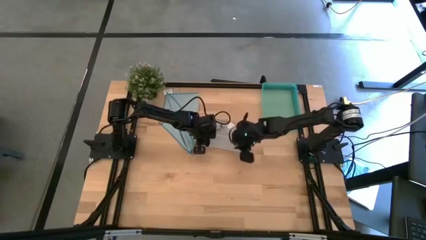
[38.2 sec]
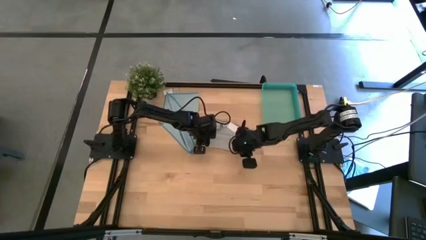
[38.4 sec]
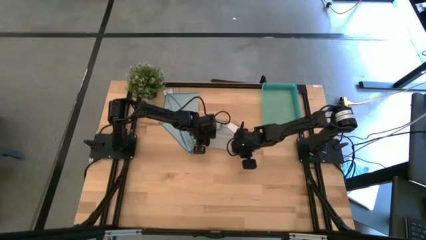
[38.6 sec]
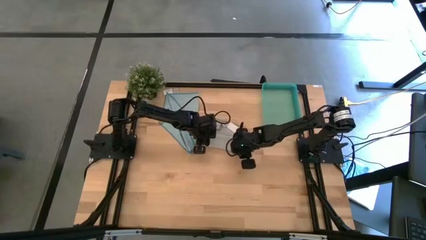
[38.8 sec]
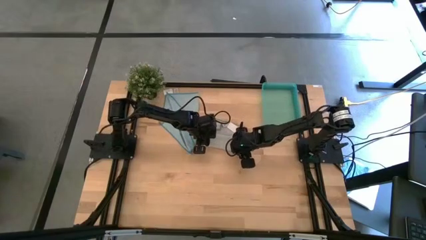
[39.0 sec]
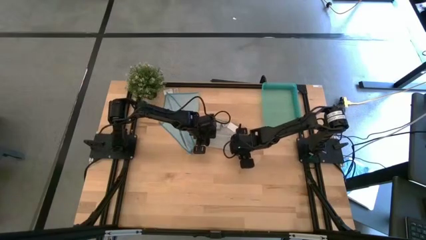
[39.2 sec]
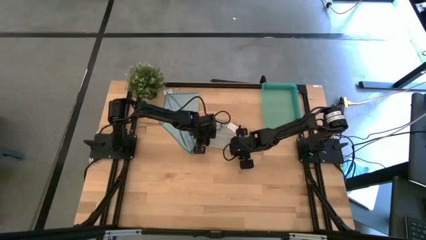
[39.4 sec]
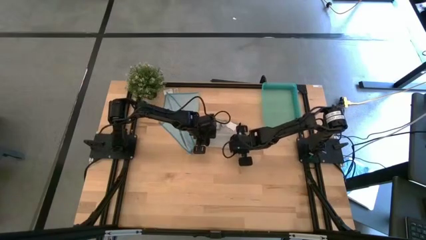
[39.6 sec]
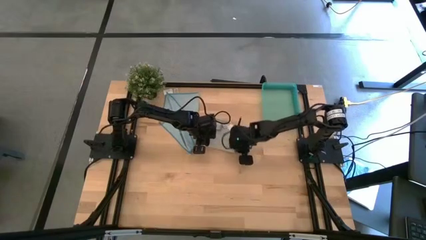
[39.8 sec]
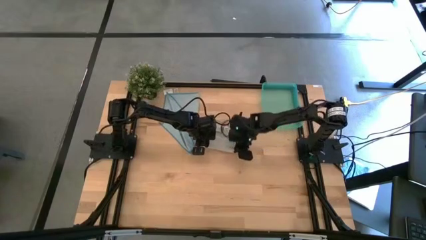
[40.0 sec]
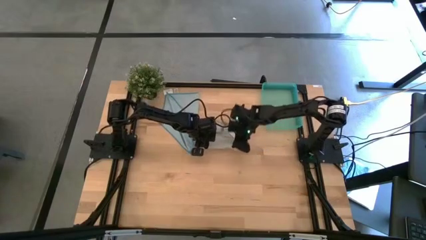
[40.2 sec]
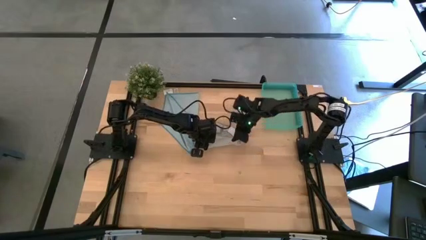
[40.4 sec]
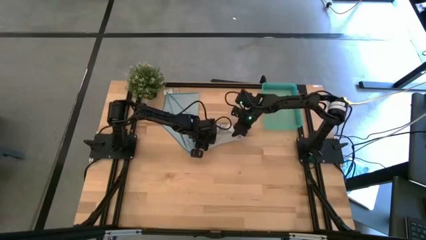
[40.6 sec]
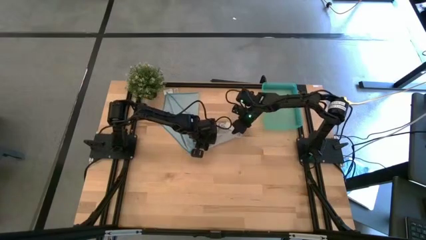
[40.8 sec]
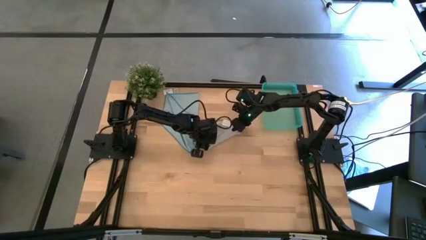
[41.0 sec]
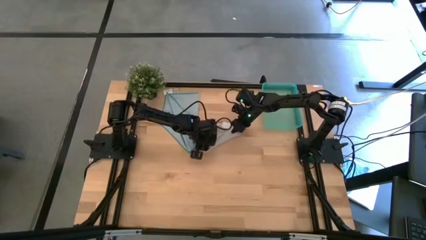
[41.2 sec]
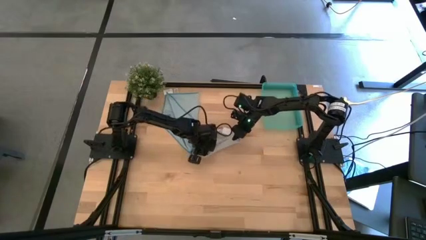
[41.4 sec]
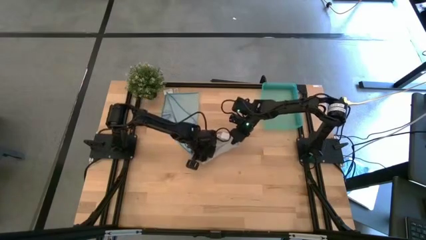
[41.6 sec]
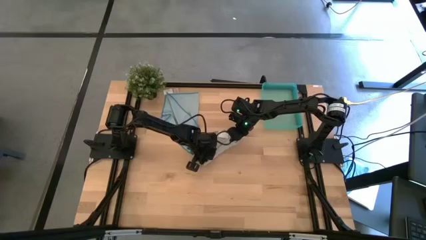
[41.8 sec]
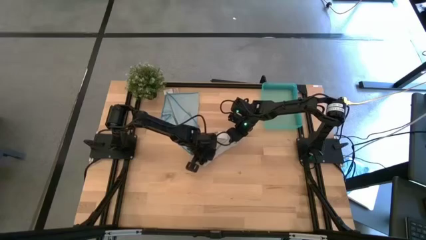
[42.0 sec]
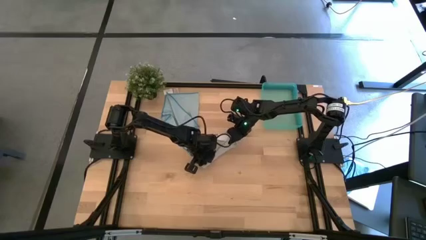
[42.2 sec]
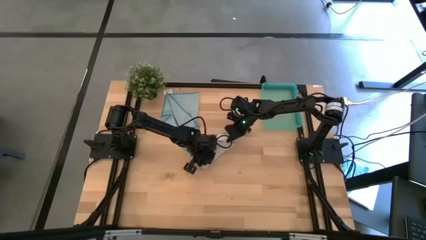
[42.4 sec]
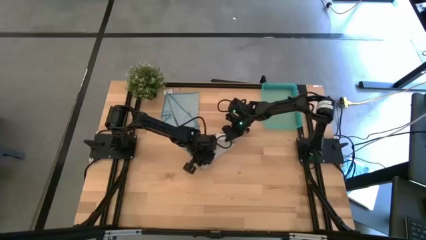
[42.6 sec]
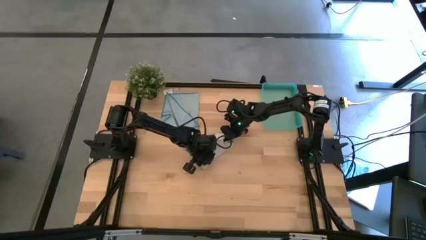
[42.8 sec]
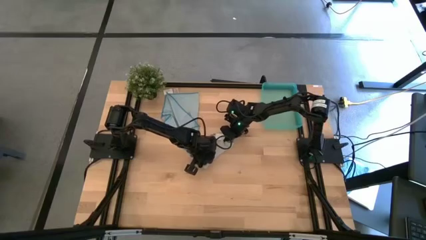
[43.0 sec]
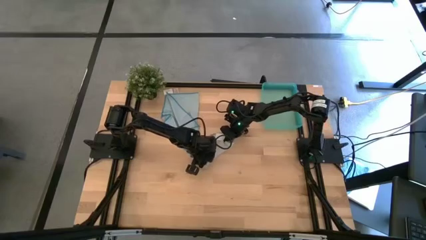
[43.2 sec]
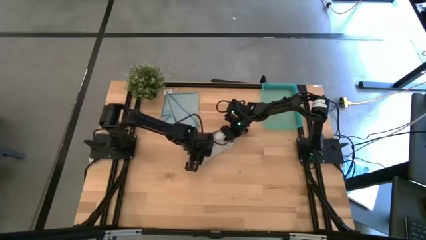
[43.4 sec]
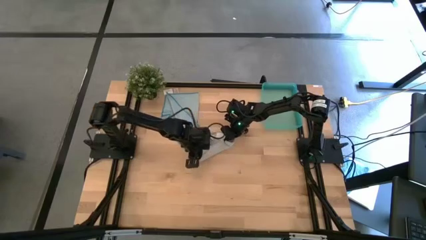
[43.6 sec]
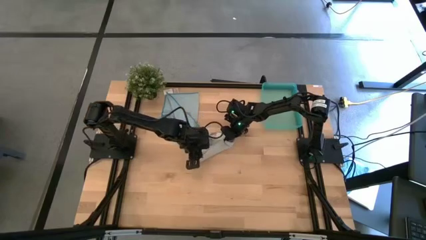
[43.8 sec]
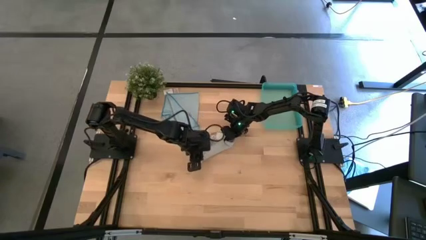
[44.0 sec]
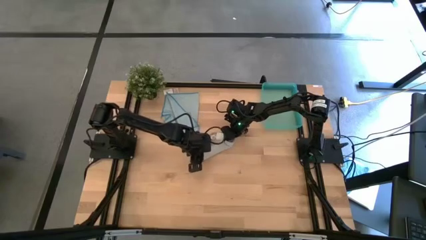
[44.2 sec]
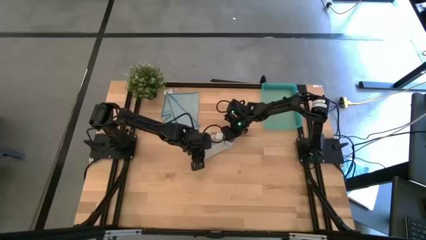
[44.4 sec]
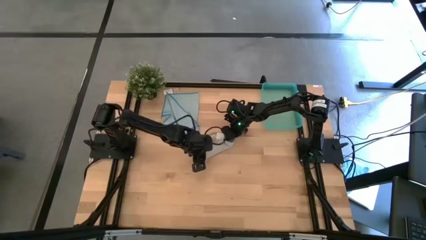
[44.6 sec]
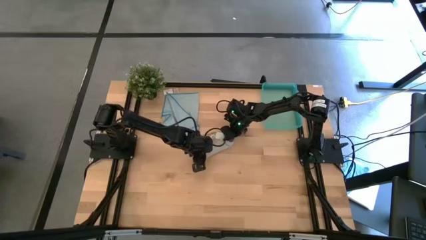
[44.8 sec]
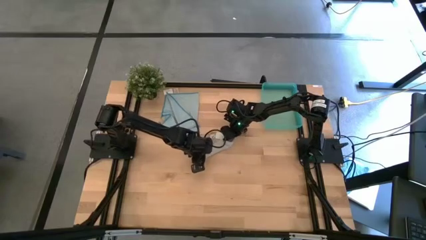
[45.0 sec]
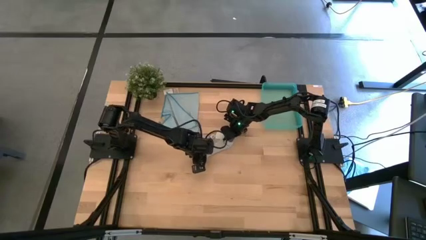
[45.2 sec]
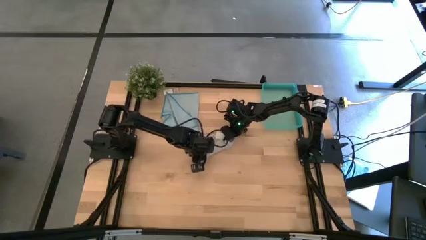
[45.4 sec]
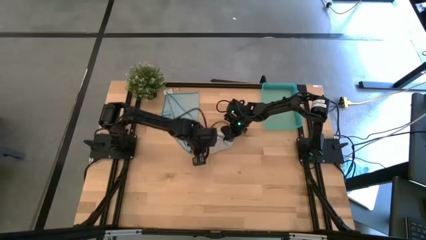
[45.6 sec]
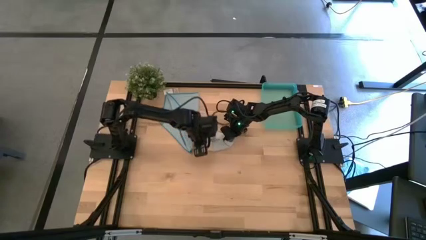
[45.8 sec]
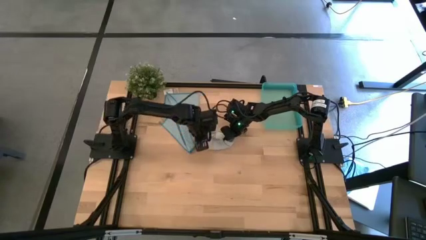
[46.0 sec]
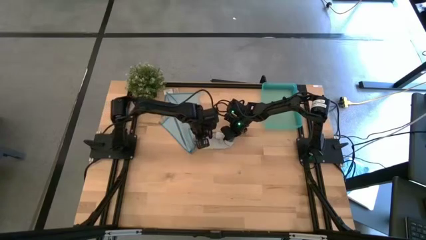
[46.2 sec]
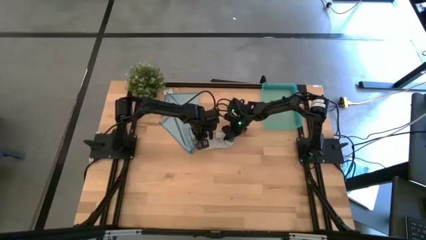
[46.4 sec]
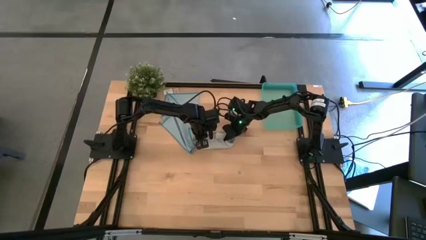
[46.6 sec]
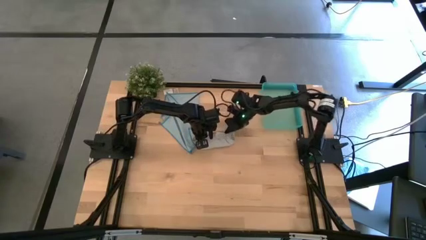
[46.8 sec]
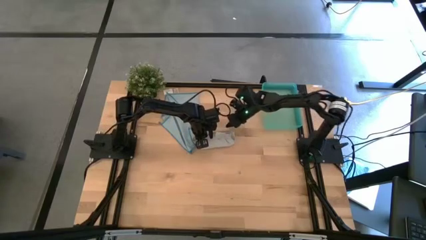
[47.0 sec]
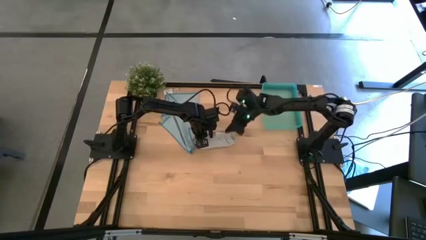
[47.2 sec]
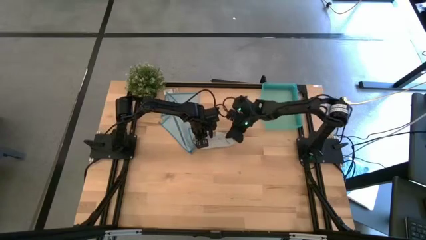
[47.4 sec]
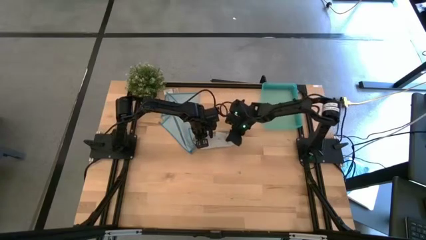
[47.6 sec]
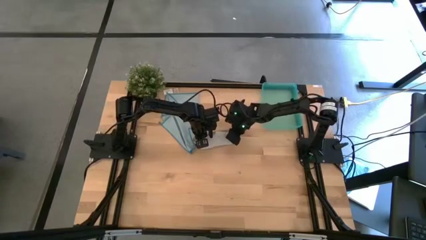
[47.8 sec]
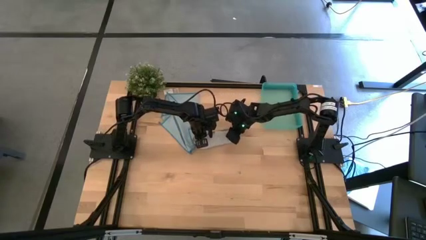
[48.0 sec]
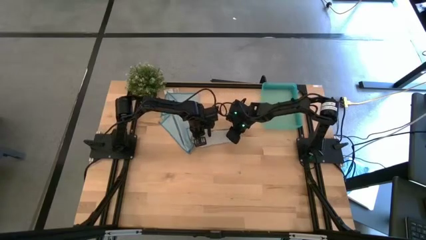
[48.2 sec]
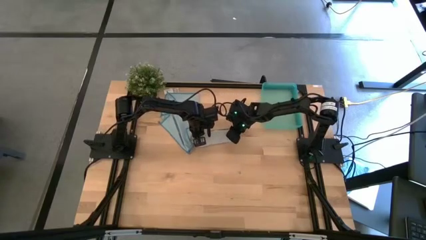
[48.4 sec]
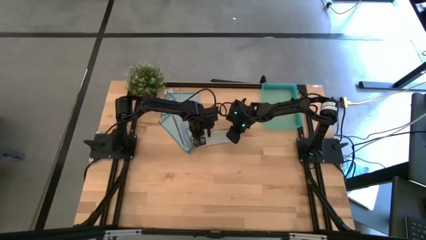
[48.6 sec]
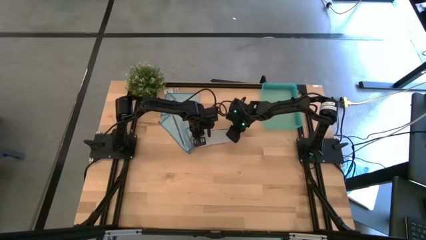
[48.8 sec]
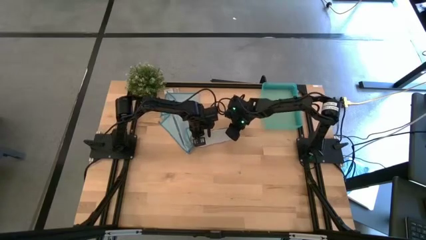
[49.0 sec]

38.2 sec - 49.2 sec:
Task: Roll microfiber towels into tight, uniform cylinder then place into a basket
Roll the gray towel
